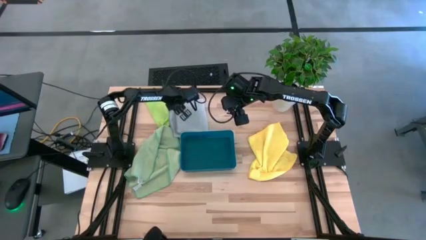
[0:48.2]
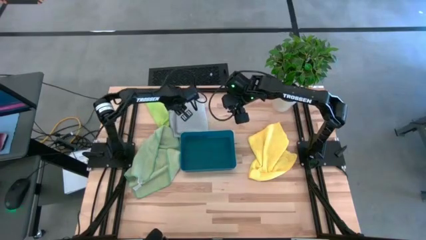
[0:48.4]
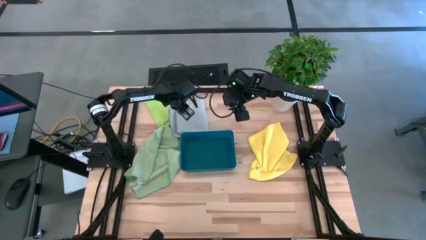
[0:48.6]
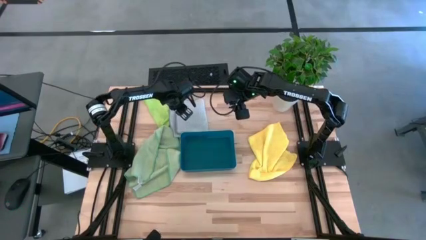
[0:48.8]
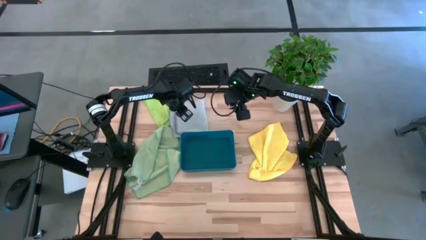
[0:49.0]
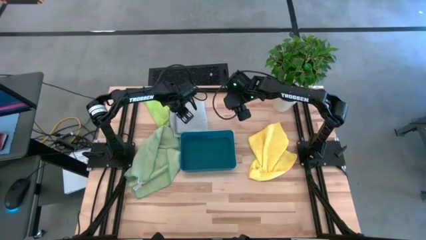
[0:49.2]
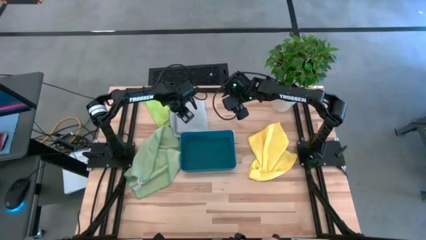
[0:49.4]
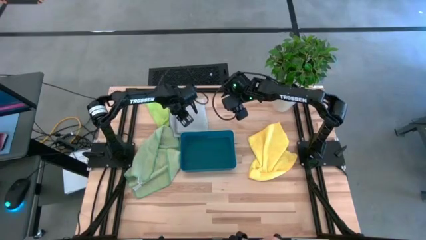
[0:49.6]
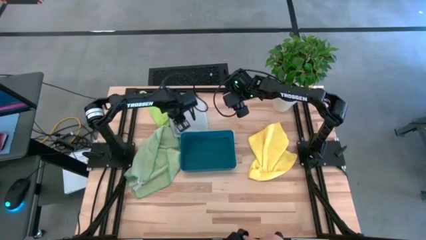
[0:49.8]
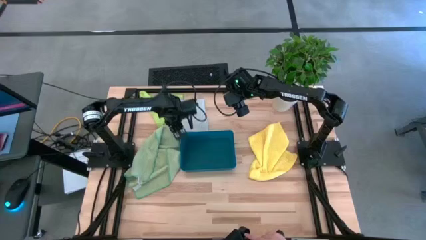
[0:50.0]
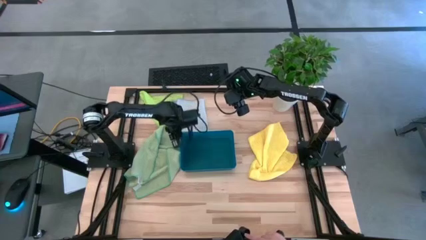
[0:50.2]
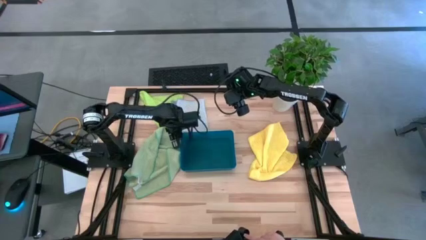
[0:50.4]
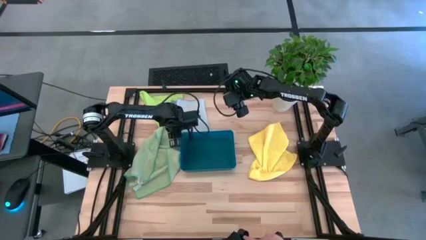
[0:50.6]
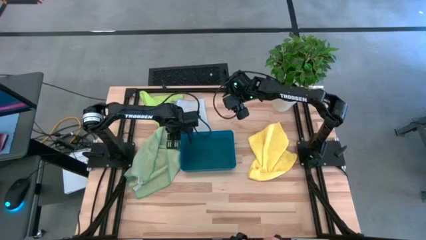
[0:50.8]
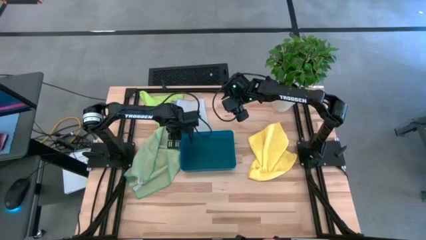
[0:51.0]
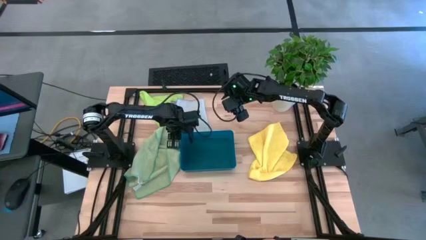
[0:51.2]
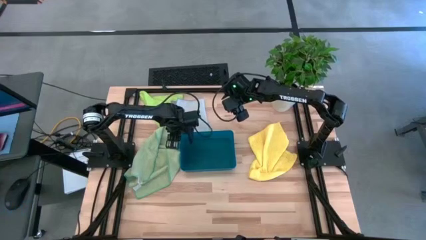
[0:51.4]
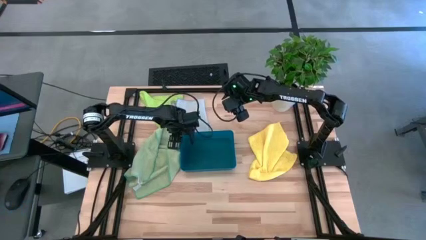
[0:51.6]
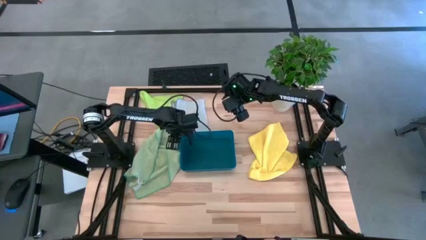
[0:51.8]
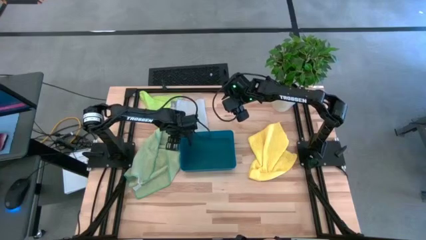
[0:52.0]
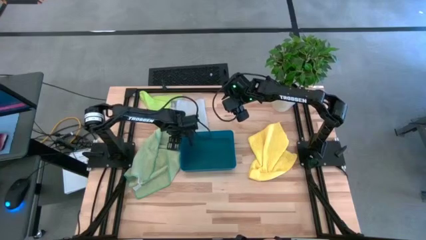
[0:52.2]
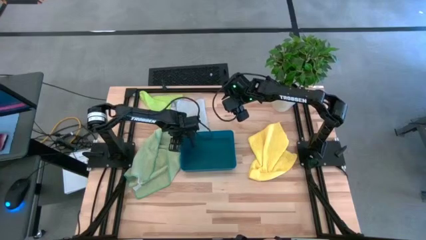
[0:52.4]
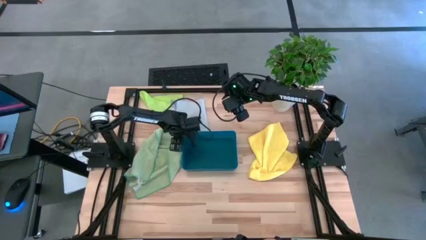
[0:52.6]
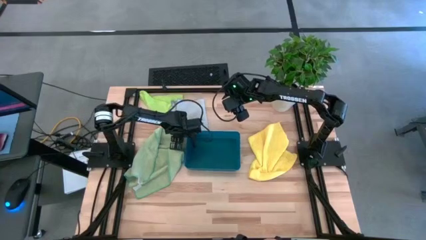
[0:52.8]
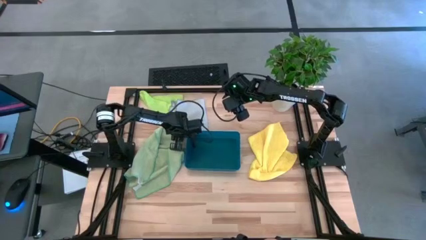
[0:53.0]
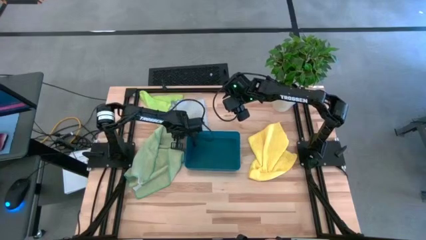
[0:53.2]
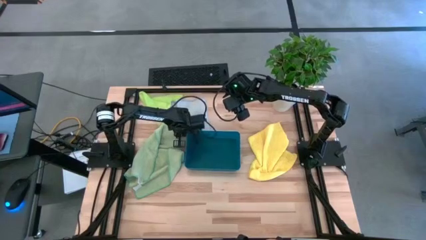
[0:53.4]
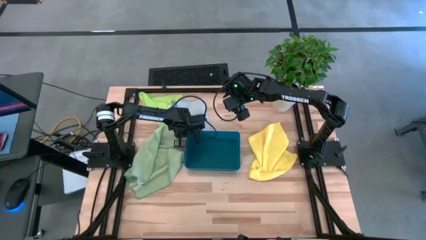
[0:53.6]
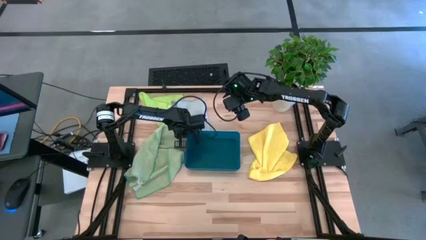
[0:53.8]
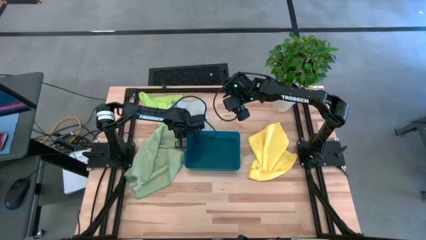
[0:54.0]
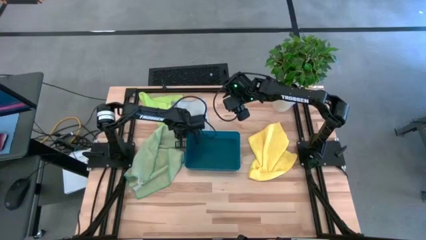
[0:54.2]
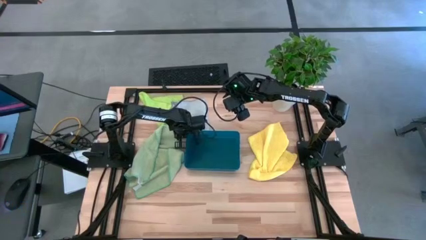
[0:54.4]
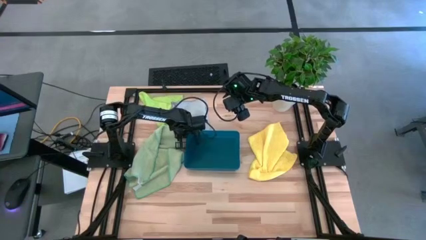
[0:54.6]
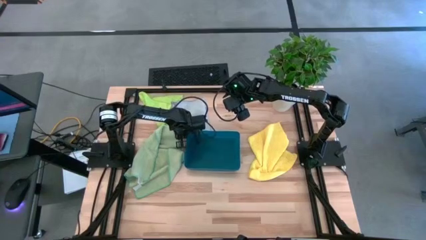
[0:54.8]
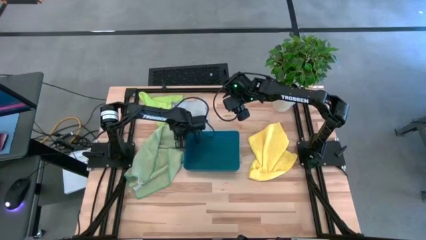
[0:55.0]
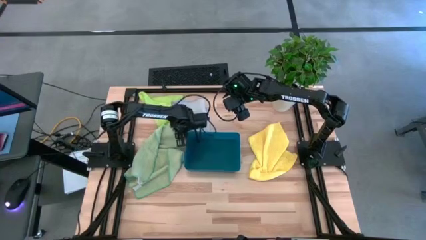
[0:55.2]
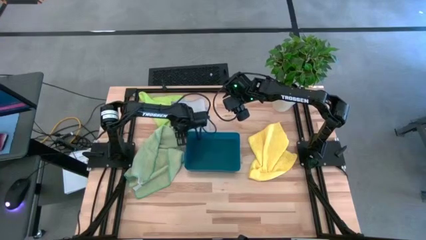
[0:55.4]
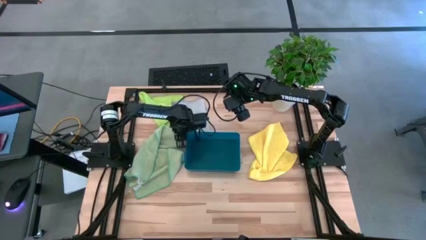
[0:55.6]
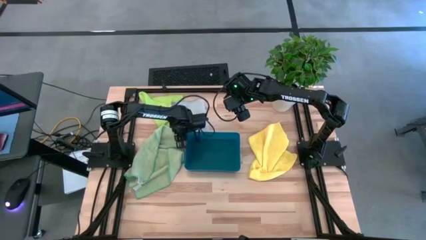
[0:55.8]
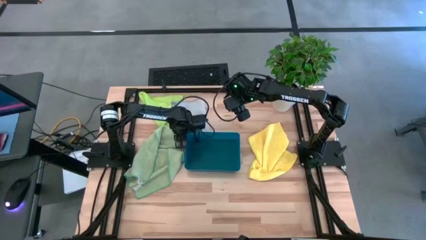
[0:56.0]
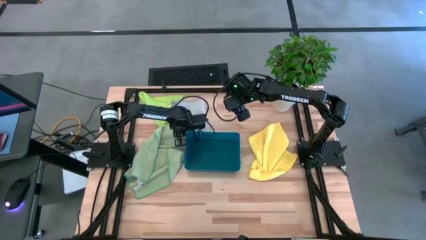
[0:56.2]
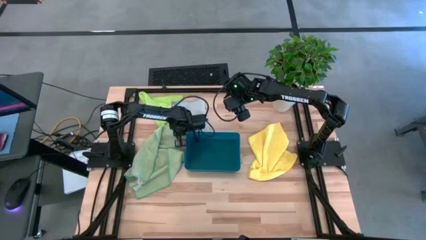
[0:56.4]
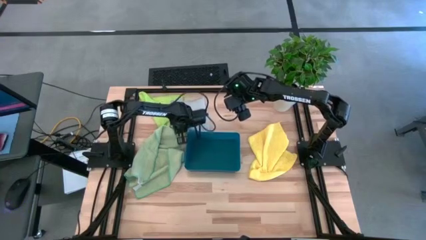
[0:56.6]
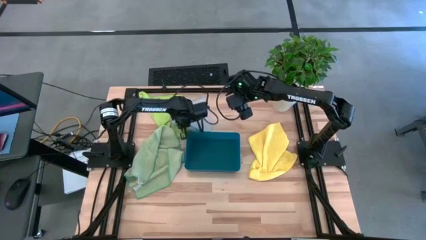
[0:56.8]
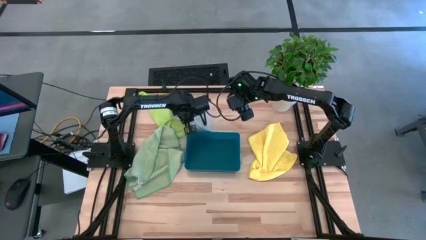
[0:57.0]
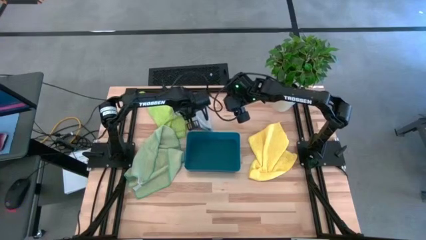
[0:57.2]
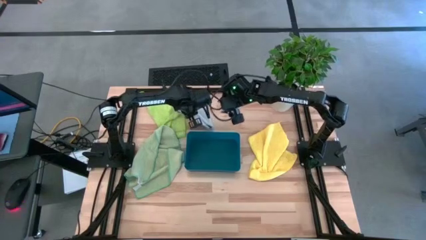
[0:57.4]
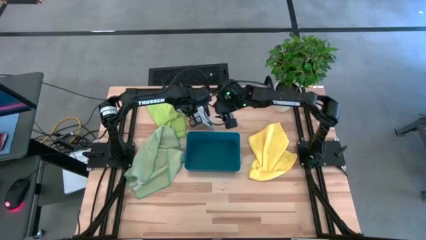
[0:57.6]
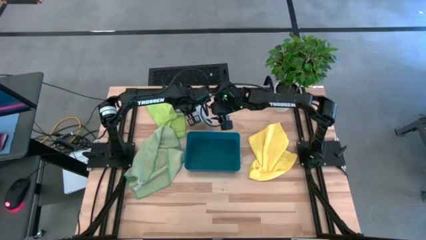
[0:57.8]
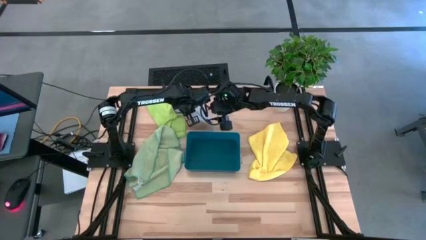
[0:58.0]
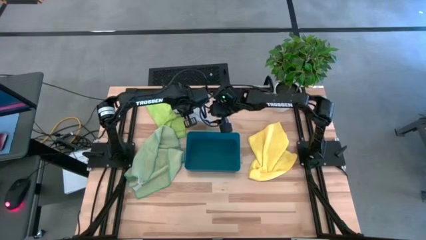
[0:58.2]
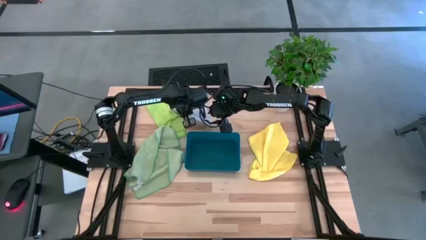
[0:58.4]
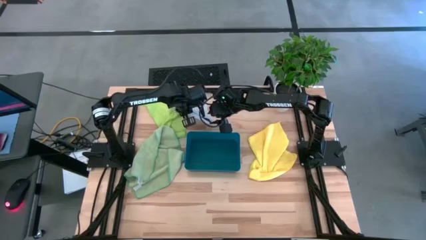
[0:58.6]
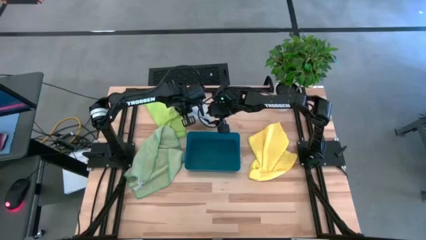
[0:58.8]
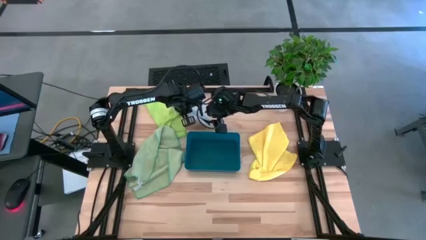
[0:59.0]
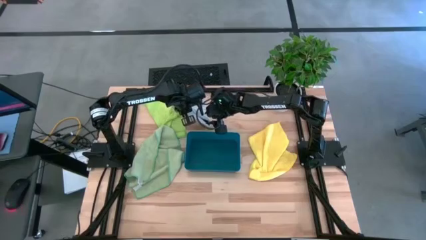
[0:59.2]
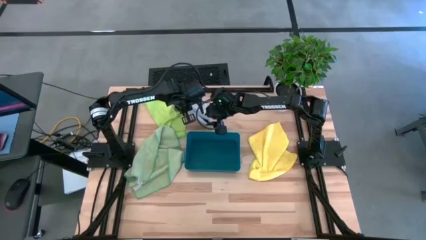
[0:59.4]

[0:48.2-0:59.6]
Task: Fold microfiber towels
Put the folded gray microfiber towel into the blue bin

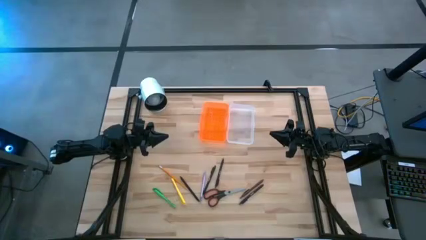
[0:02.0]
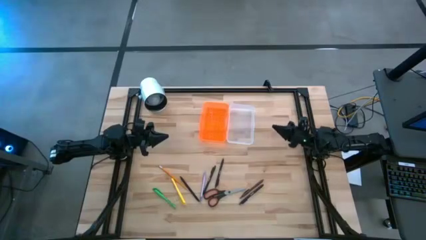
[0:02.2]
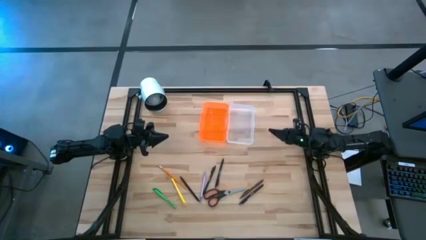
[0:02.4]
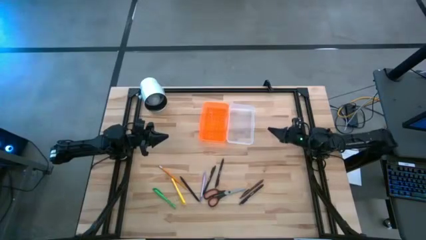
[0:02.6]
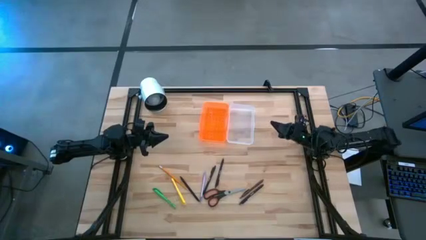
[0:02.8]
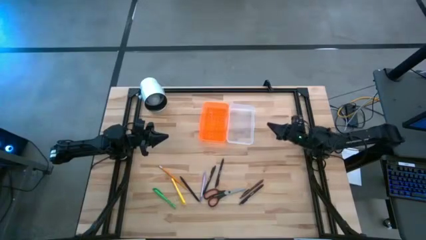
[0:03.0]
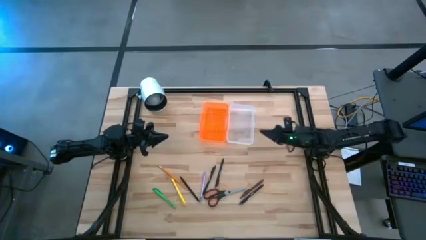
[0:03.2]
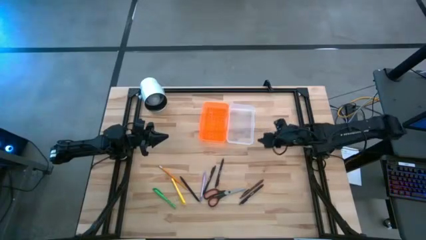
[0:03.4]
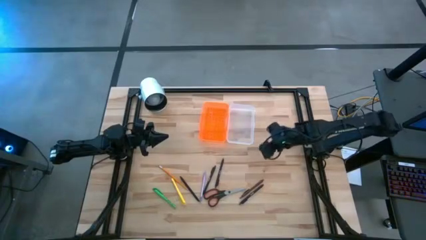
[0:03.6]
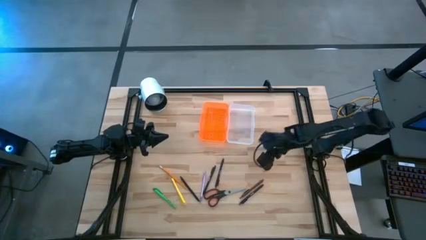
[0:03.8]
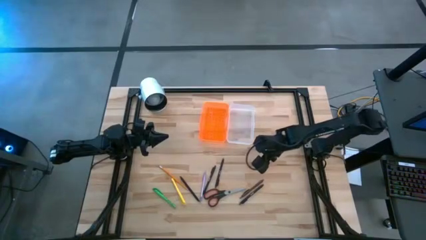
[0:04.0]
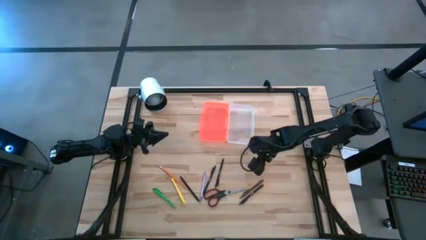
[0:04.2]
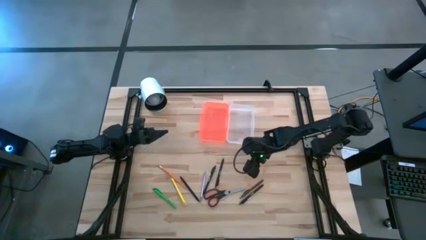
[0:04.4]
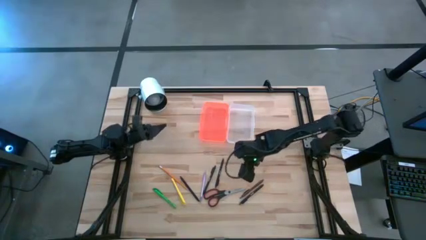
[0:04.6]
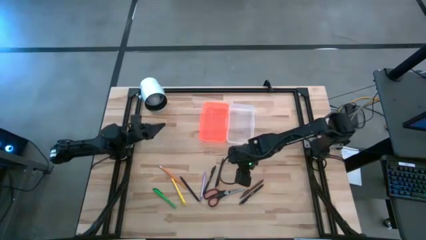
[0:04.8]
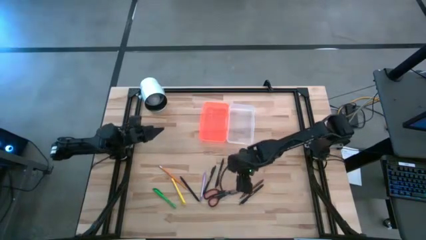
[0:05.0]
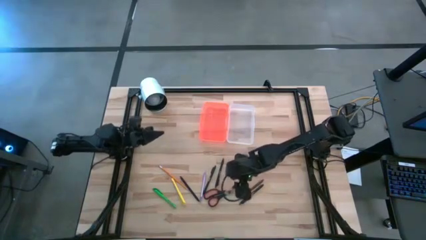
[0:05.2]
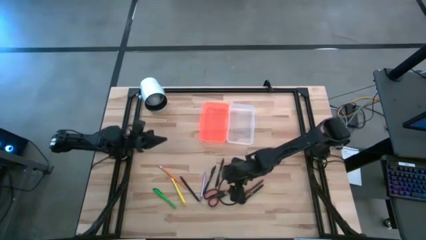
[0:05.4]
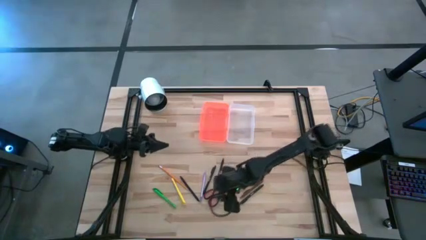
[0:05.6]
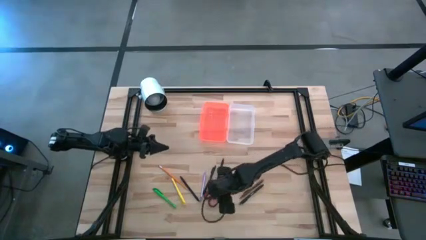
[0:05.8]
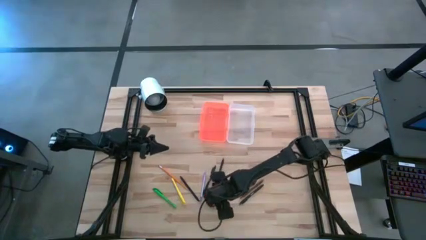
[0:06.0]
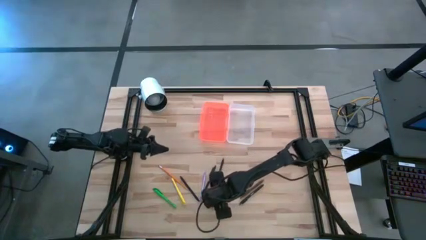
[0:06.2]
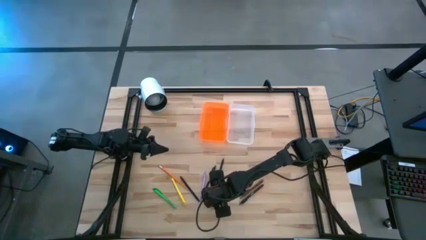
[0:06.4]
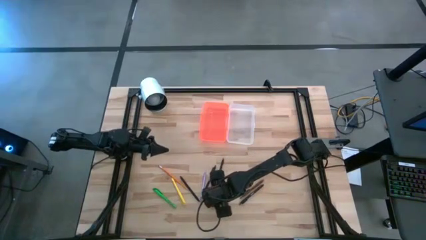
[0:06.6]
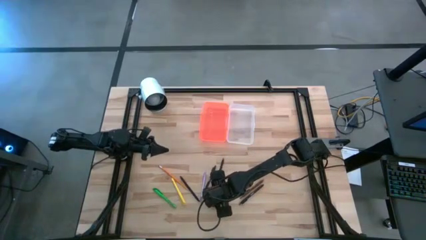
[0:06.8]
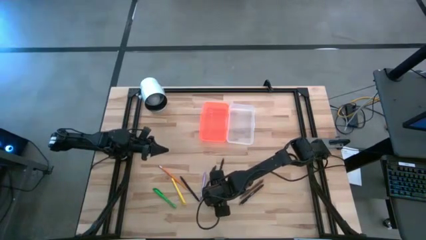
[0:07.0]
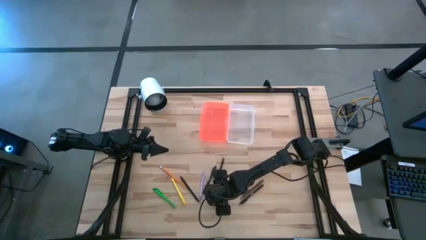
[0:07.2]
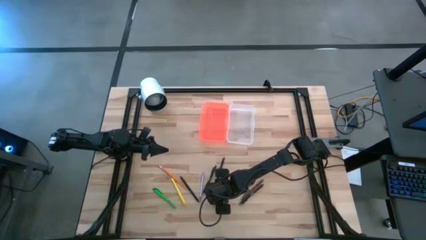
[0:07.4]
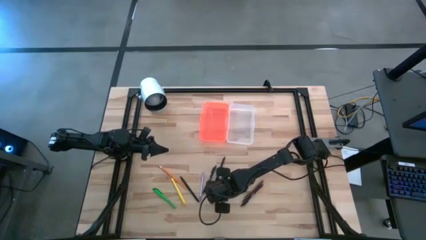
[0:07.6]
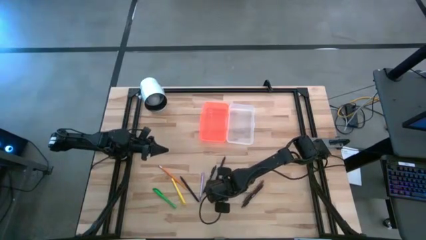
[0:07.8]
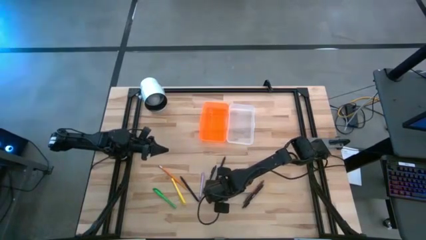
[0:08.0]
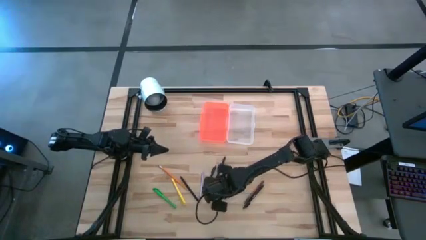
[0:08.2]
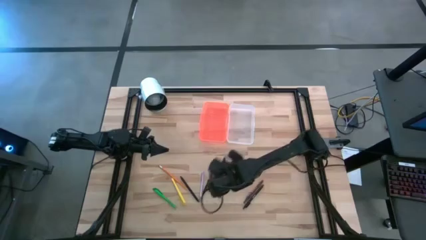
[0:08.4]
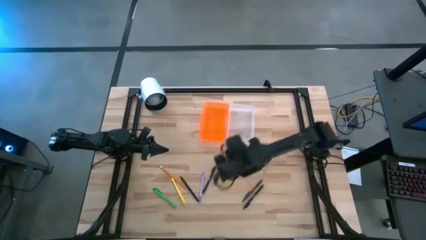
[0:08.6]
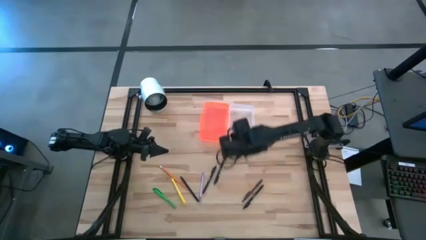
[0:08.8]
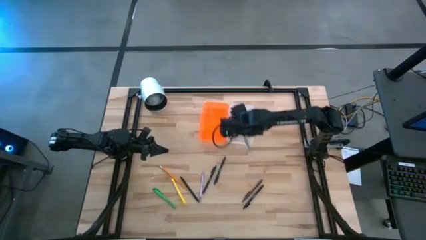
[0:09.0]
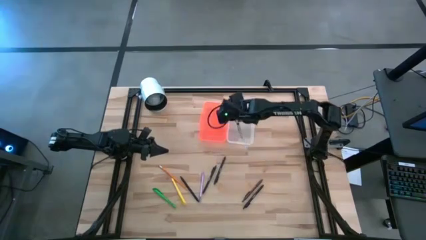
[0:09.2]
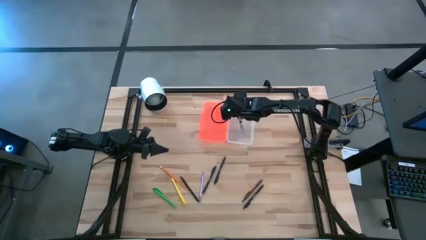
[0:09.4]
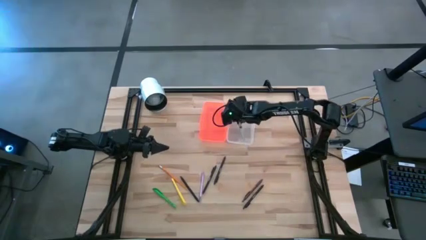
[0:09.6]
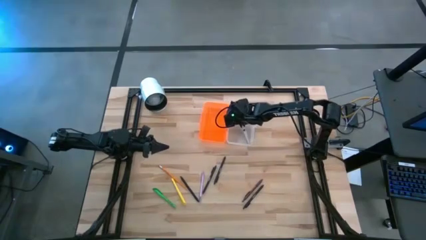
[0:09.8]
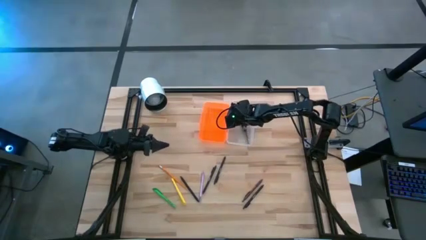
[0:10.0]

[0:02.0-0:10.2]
Task: Pick & place school supplies into a supply box
Put the black scissors into the orange supply box
